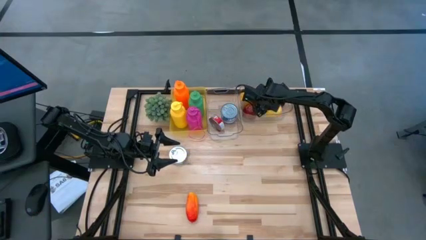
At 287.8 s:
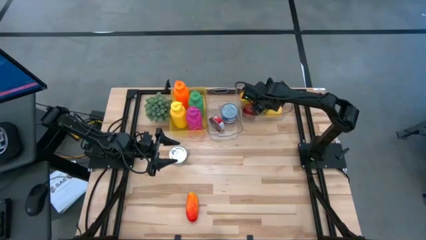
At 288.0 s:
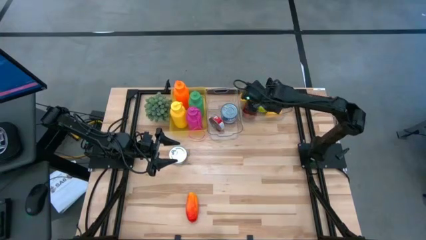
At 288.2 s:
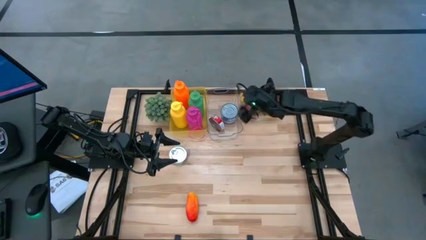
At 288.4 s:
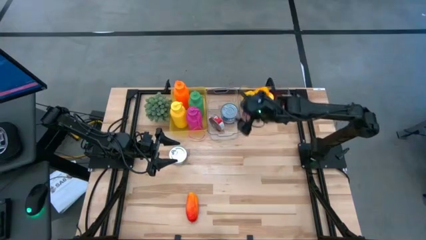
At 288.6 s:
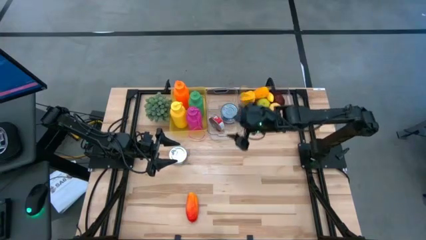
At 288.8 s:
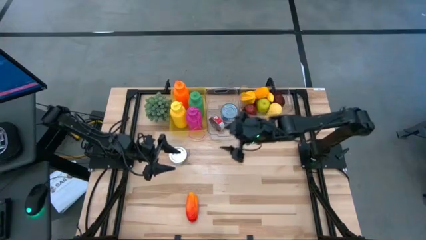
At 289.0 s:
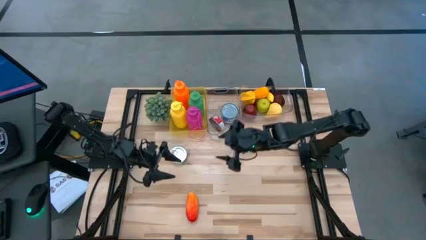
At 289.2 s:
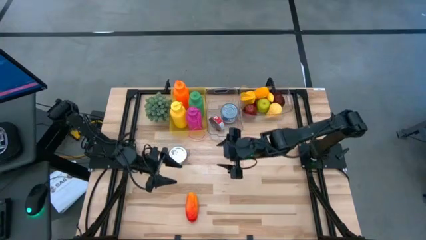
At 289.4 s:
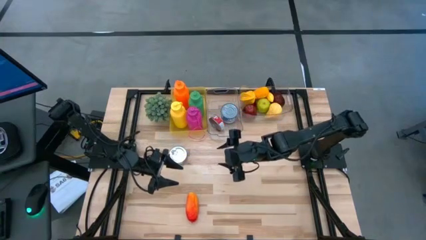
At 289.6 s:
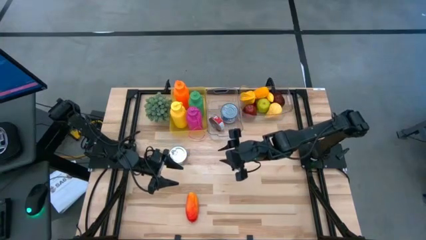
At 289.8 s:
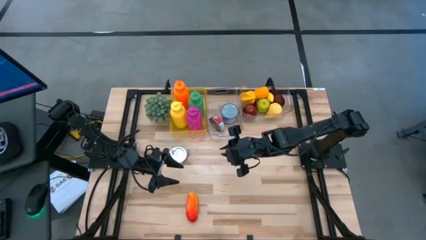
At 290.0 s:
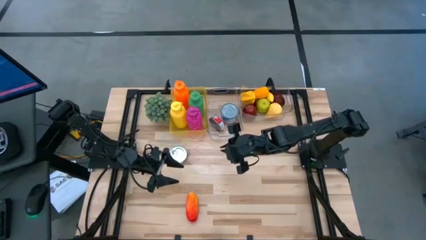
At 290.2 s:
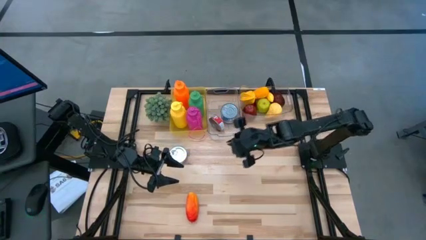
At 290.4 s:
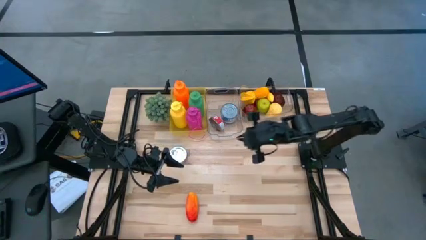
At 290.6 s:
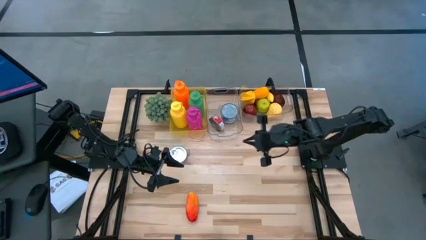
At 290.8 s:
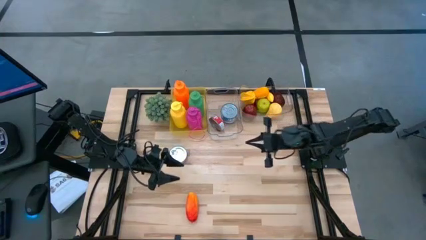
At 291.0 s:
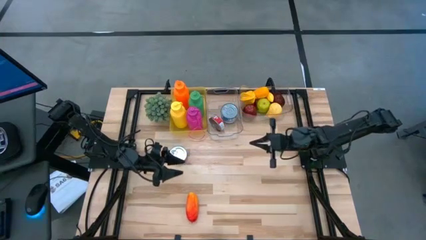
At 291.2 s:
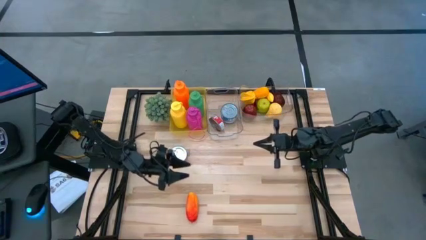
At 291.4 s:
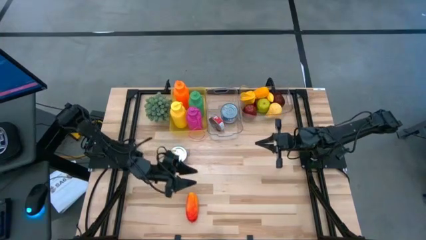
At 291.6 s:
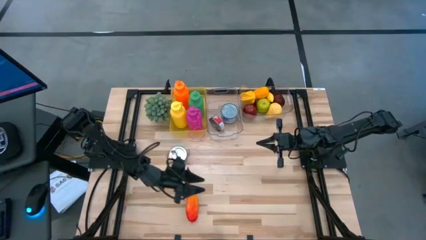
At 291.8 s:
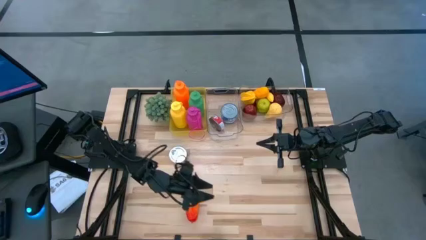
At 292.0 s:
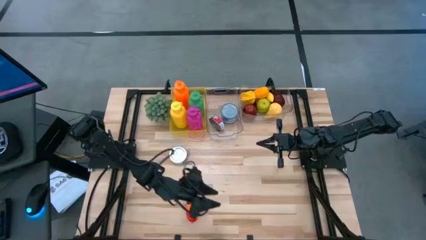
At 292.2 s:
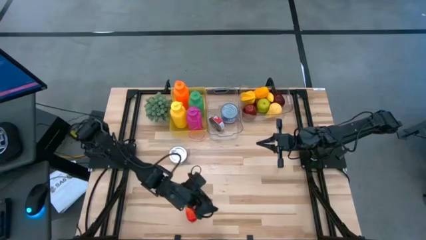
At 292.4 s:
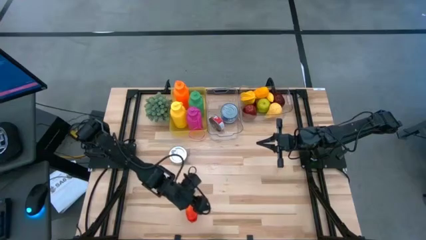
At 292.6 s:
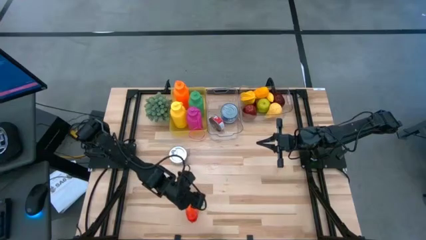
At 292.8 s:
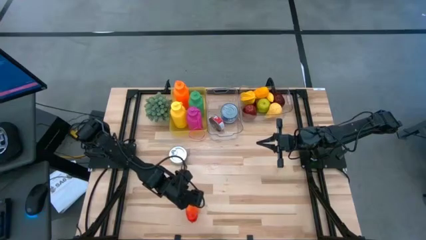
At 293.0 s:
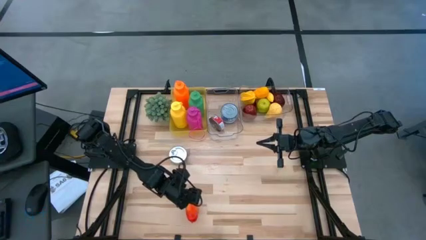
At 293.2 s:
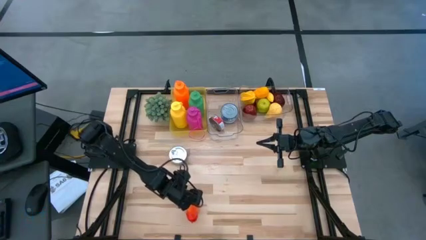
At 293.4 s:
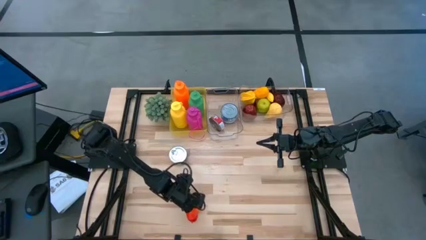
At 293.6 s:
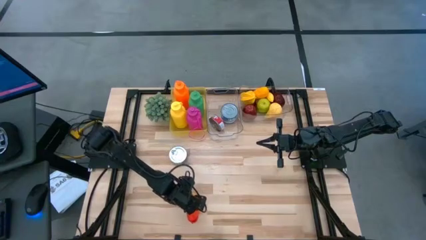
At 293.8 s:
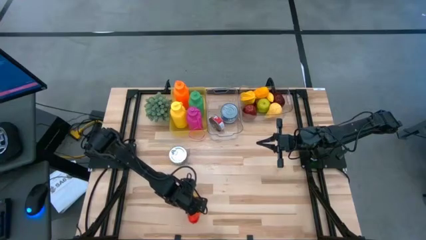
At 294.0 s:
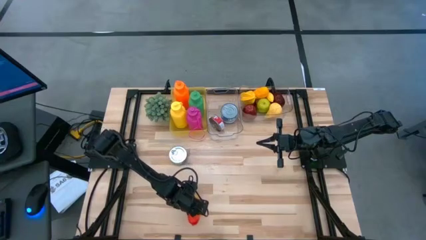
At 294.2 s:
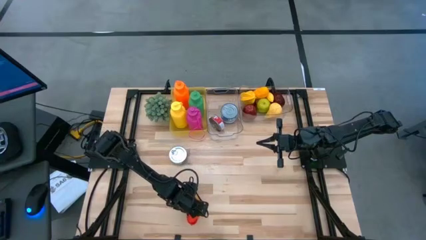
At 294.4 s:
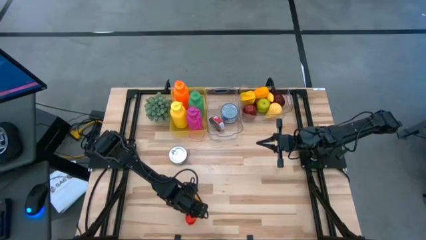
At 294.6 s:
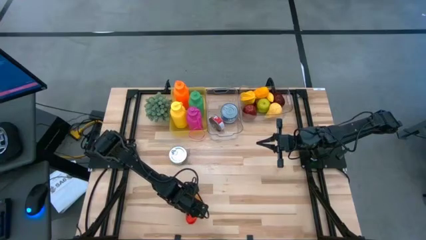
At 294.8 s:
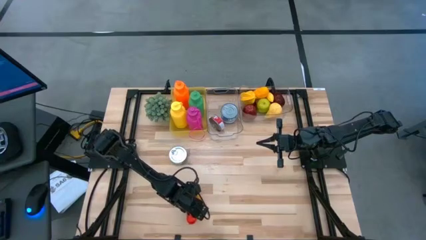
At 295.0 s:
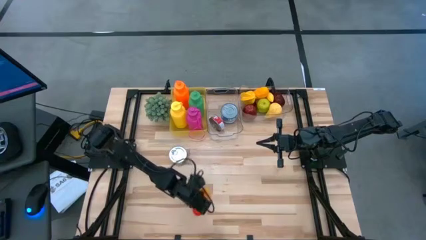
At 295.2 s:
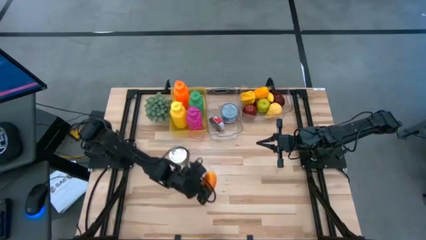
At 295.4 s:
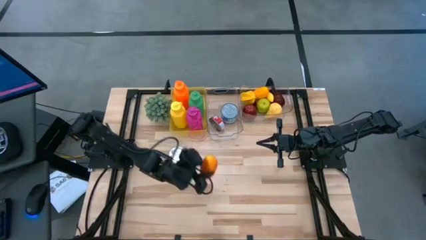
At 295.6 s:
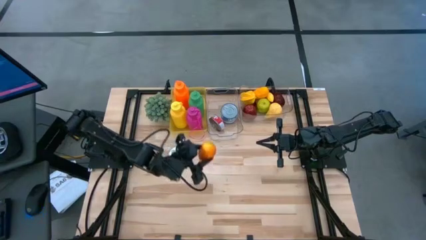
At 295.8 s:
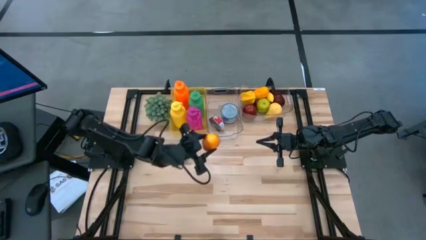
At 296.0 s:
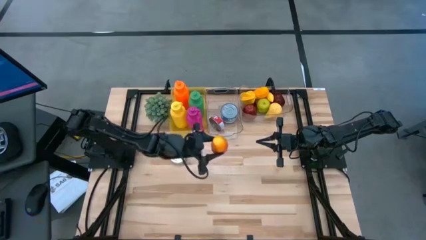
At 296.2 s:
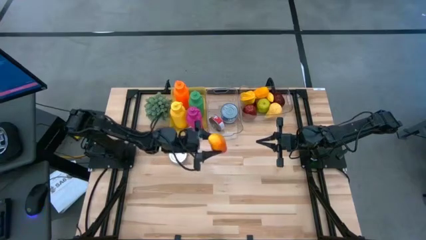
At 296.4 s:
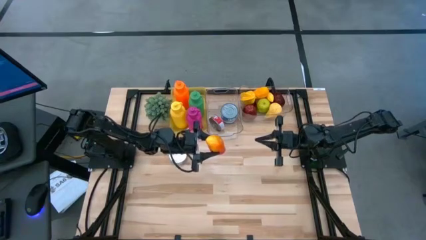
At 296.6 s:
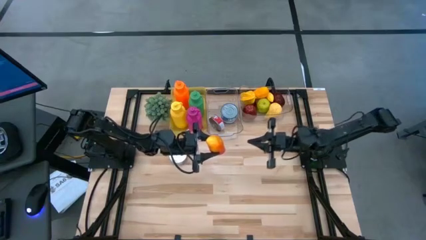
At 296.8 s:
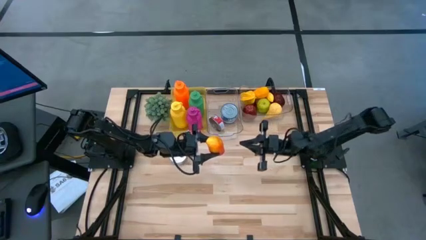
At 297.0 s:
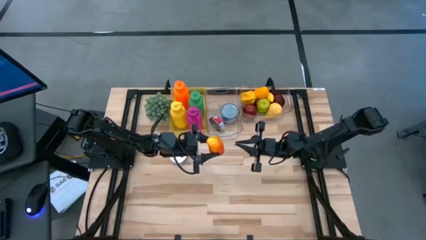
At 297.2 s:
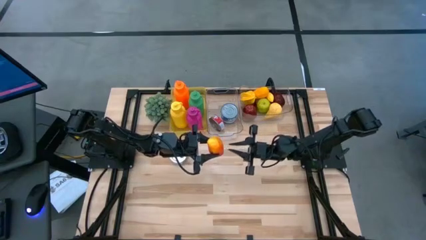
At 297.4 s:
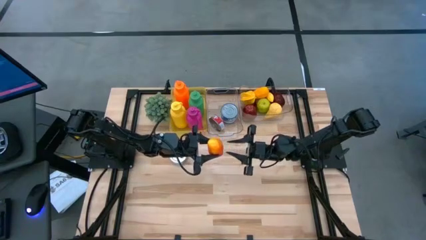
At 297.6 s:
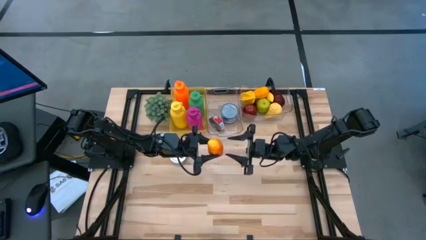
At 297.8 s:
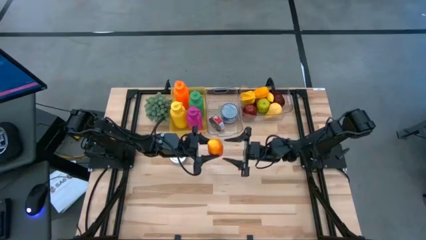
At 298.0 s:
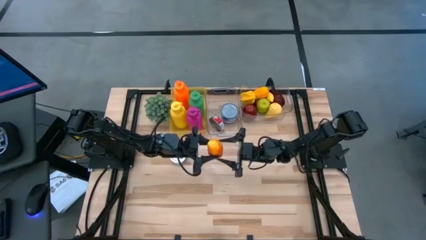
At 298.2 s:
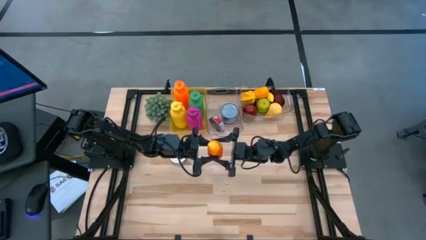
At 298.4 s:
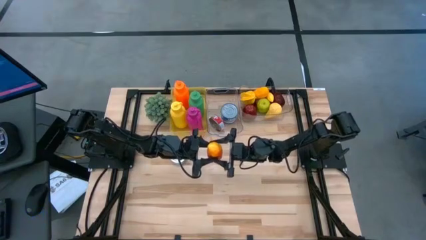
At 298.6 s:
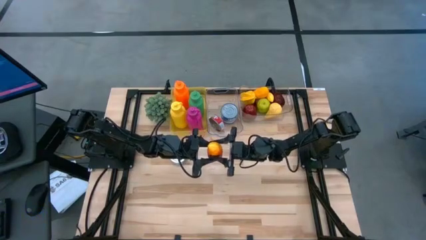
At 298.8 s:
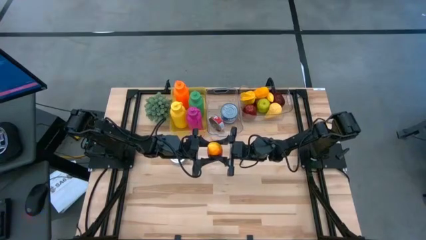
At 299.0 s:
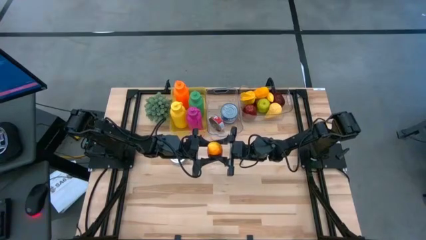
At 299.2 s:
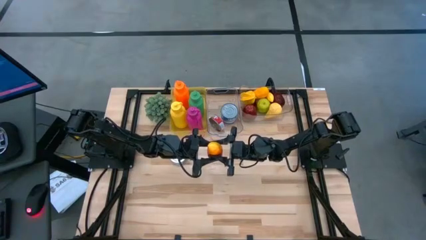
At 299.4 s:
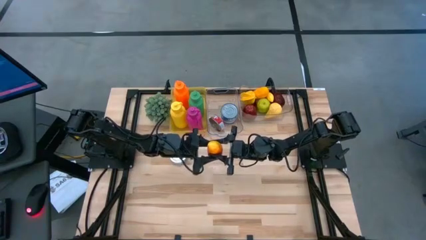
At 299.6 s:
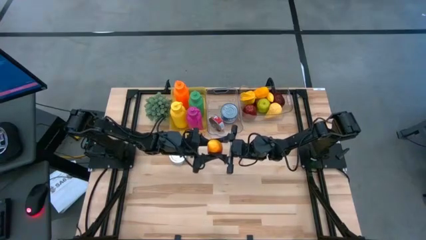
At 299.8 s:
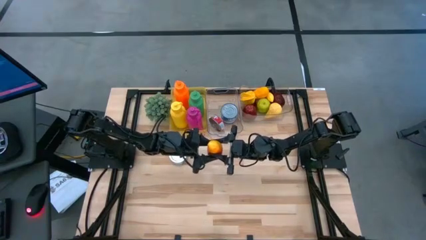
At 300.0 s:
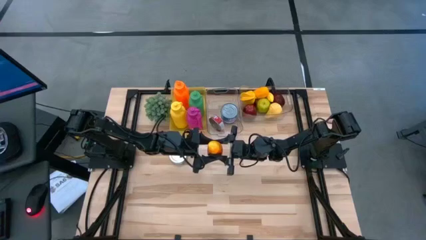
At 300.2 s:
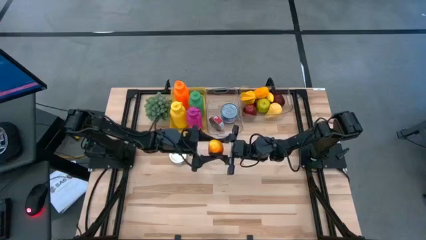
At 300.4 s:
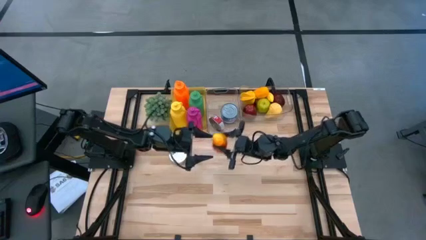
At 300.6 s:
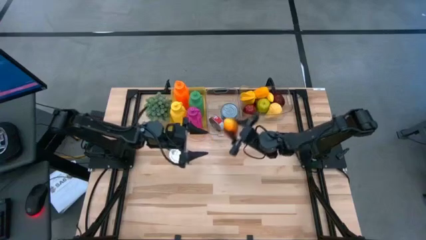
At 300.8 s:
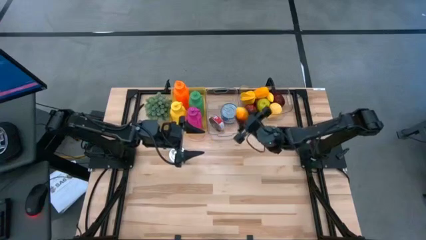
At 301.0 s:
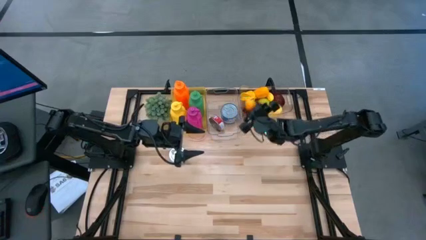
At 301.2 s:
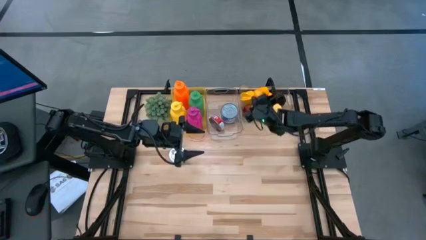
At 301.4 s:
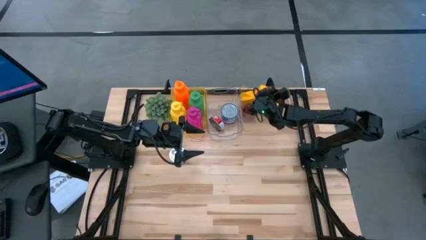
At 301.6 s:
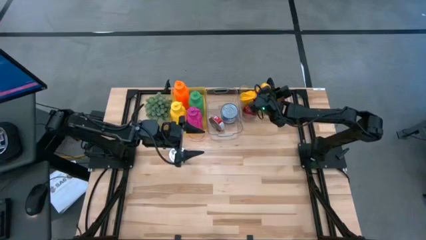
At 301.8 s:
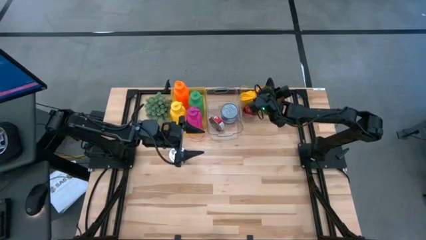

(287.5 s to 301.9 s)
Task: Pick & Place Food Item
Put the orange mango into the right transparent bin
